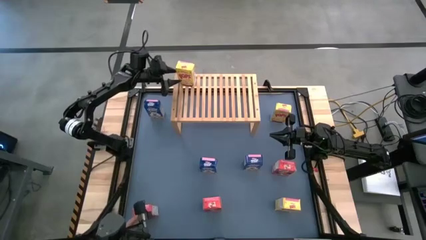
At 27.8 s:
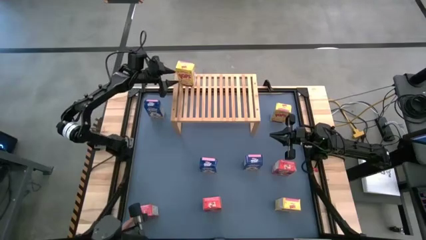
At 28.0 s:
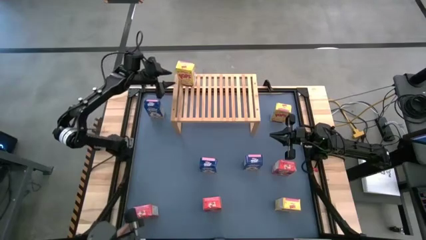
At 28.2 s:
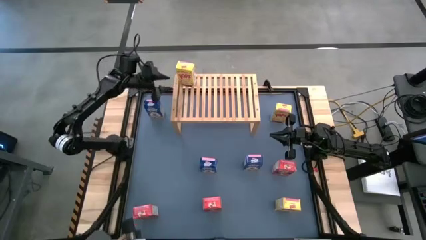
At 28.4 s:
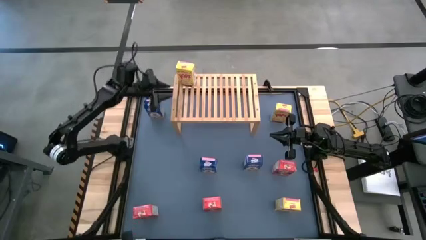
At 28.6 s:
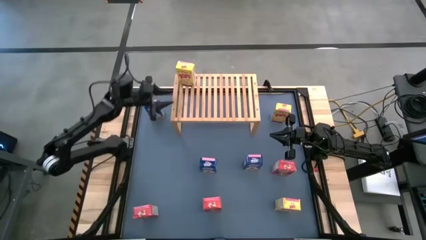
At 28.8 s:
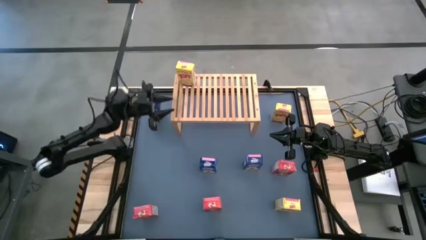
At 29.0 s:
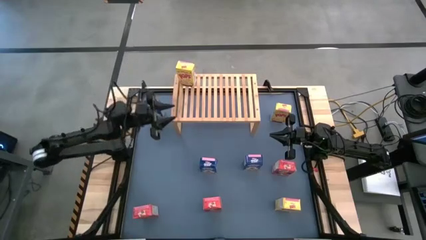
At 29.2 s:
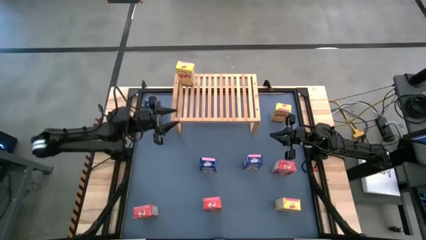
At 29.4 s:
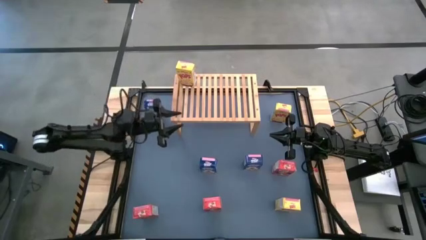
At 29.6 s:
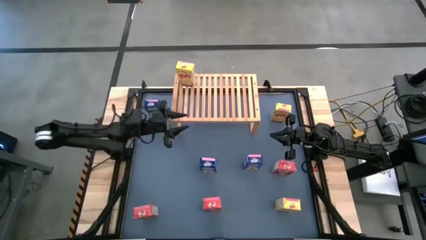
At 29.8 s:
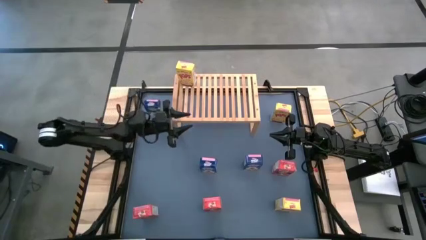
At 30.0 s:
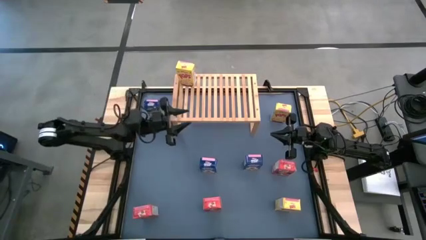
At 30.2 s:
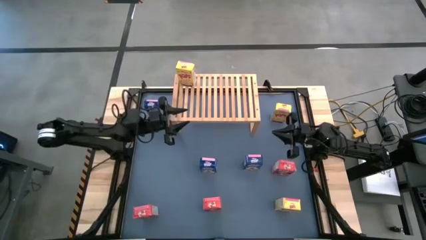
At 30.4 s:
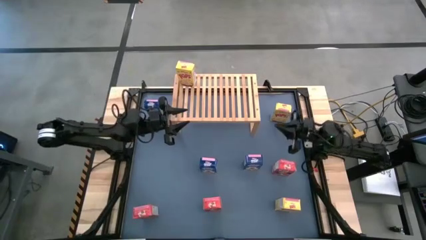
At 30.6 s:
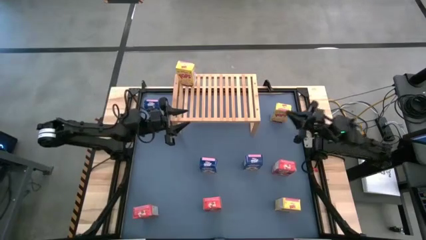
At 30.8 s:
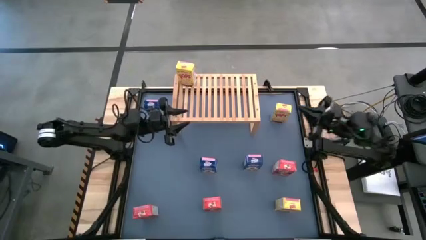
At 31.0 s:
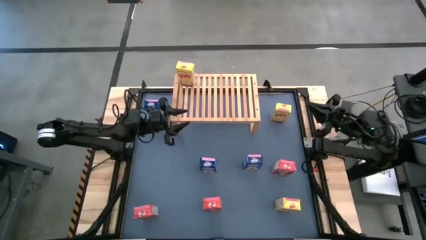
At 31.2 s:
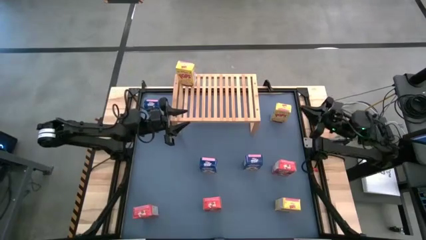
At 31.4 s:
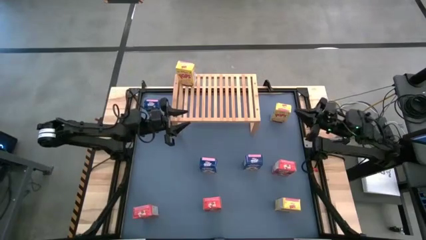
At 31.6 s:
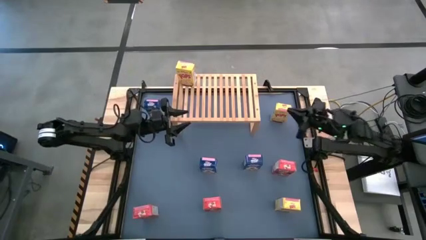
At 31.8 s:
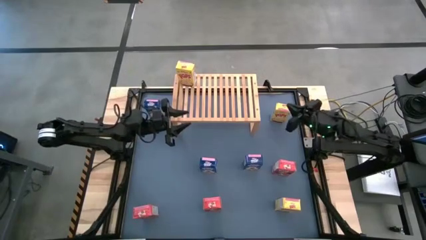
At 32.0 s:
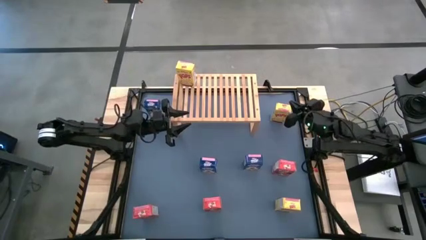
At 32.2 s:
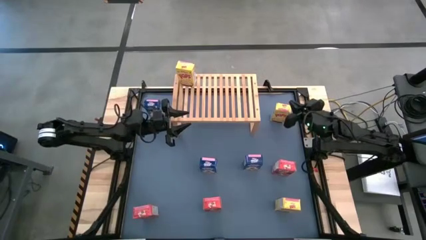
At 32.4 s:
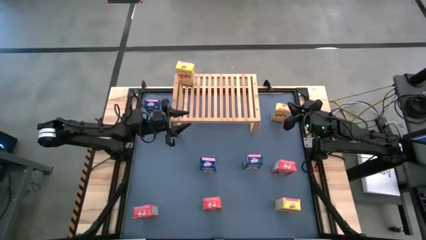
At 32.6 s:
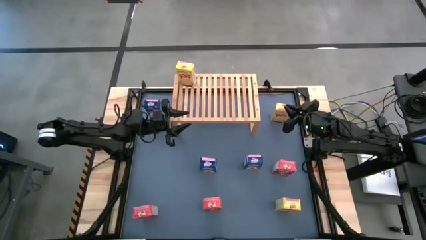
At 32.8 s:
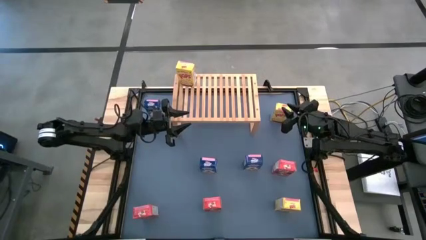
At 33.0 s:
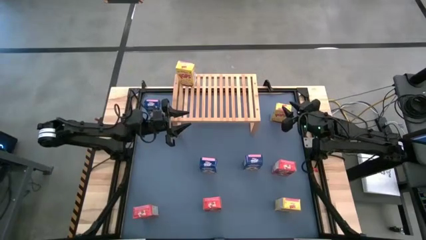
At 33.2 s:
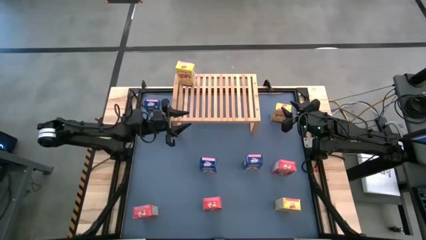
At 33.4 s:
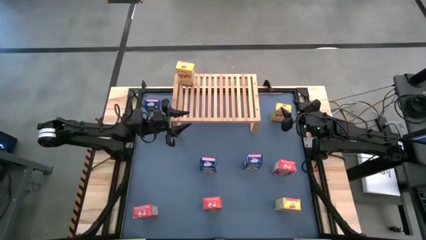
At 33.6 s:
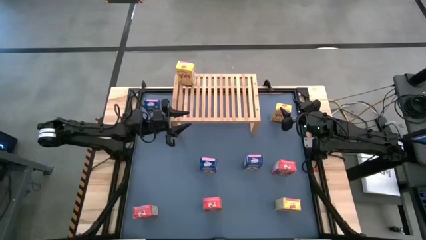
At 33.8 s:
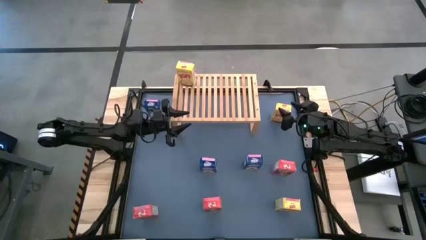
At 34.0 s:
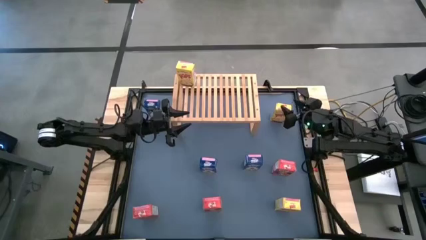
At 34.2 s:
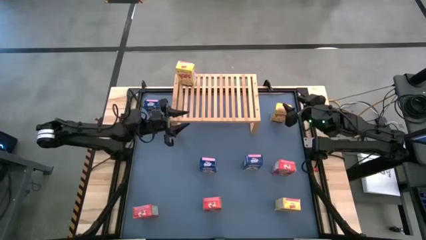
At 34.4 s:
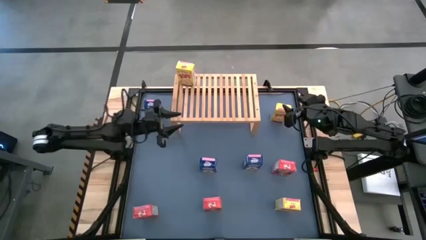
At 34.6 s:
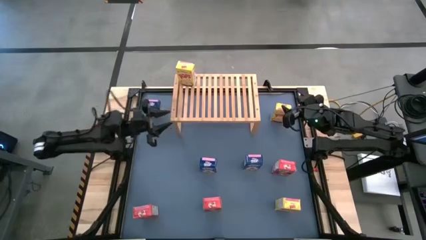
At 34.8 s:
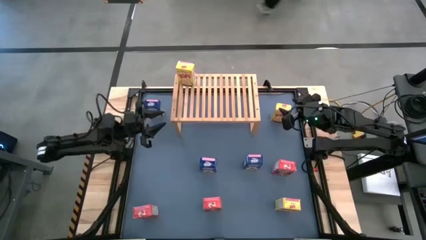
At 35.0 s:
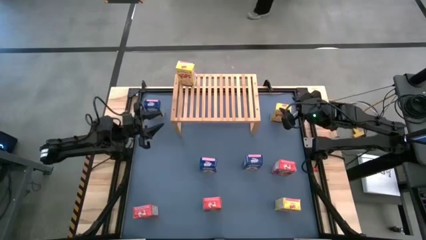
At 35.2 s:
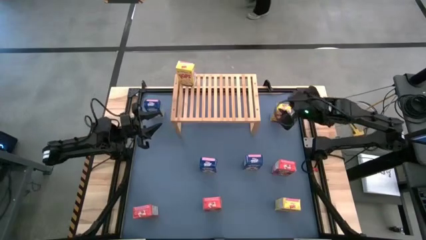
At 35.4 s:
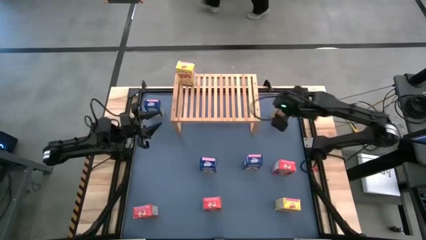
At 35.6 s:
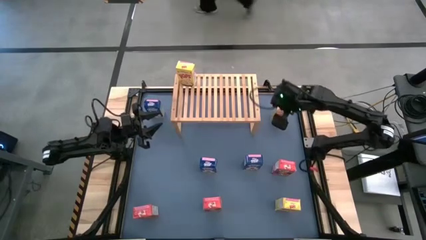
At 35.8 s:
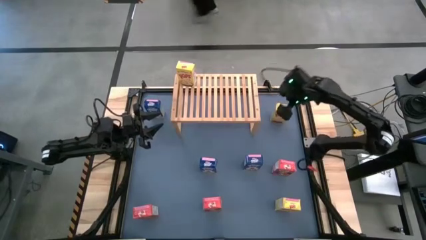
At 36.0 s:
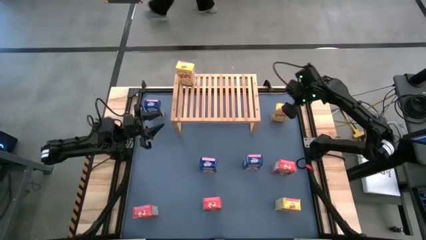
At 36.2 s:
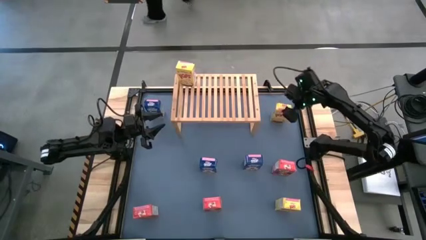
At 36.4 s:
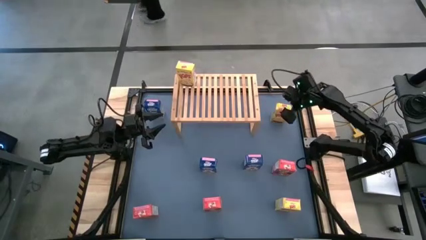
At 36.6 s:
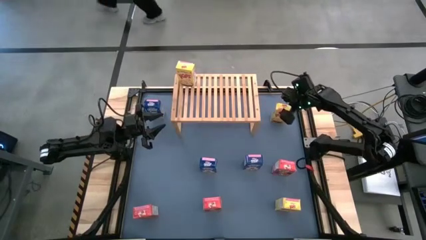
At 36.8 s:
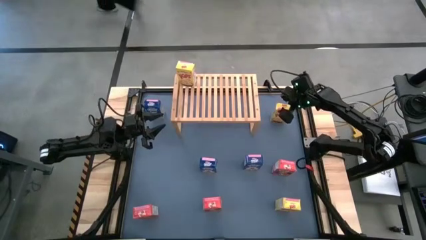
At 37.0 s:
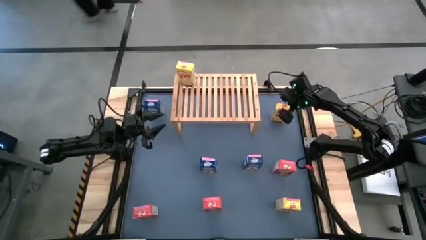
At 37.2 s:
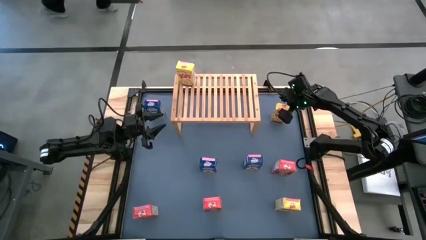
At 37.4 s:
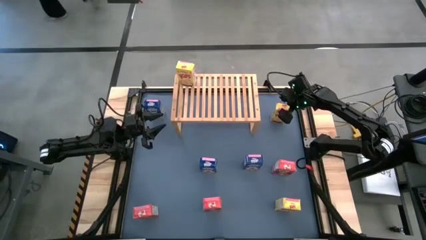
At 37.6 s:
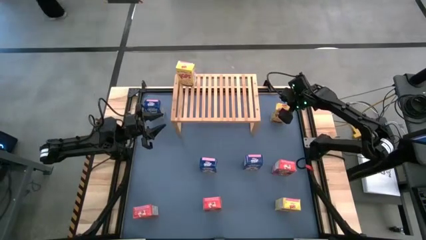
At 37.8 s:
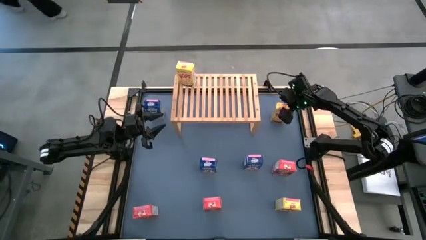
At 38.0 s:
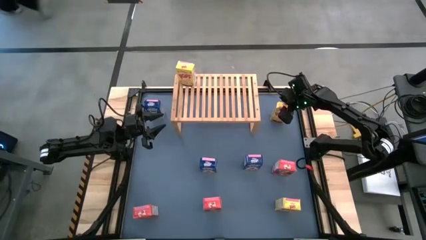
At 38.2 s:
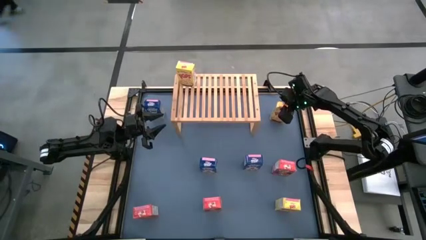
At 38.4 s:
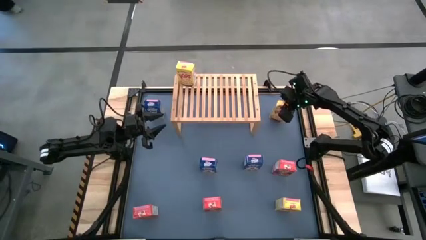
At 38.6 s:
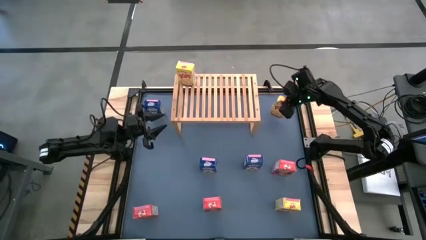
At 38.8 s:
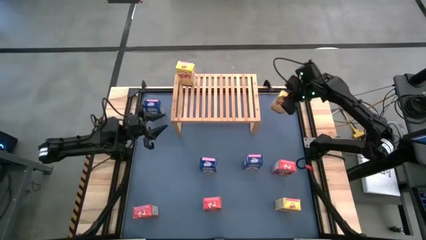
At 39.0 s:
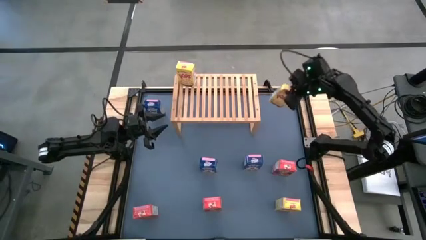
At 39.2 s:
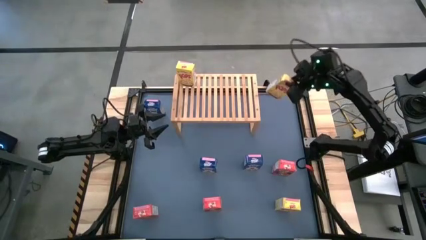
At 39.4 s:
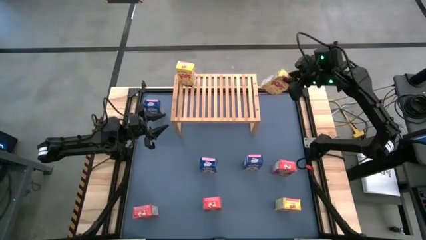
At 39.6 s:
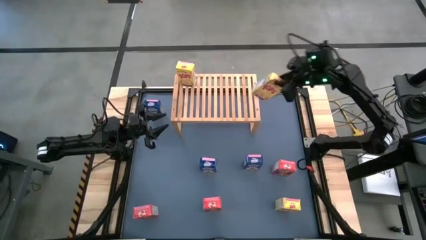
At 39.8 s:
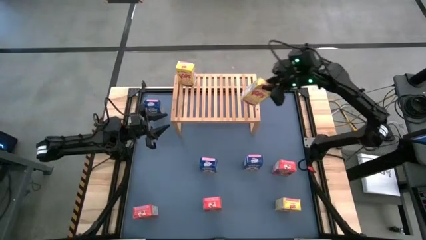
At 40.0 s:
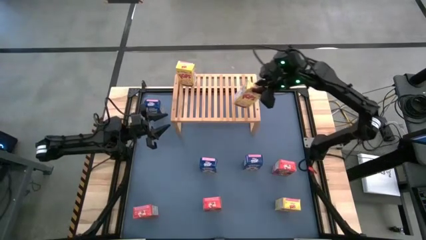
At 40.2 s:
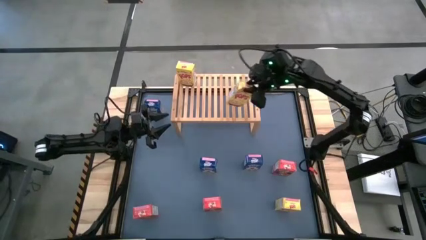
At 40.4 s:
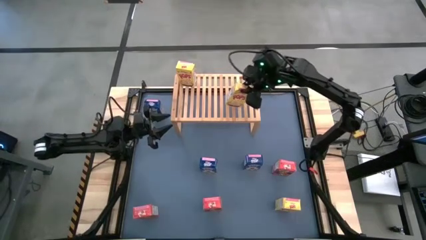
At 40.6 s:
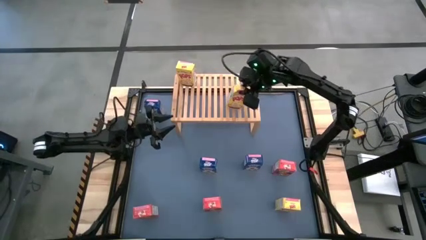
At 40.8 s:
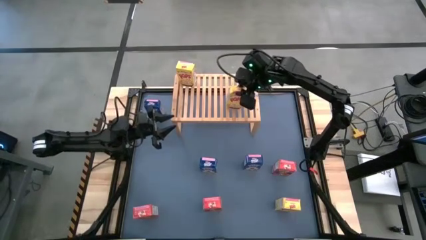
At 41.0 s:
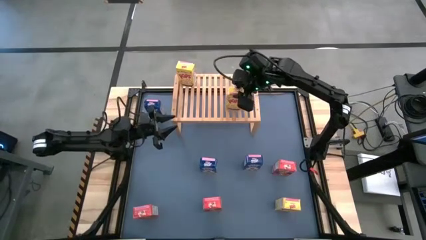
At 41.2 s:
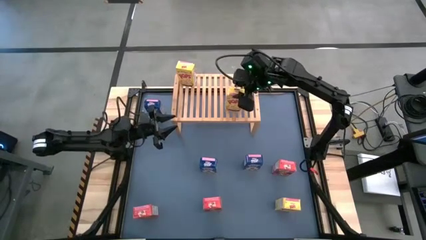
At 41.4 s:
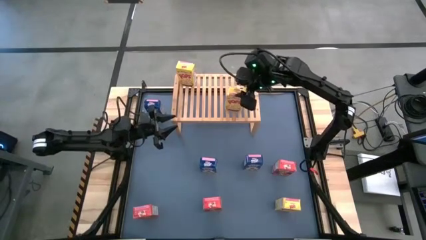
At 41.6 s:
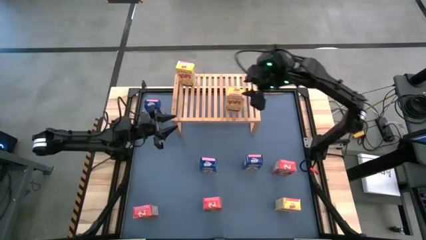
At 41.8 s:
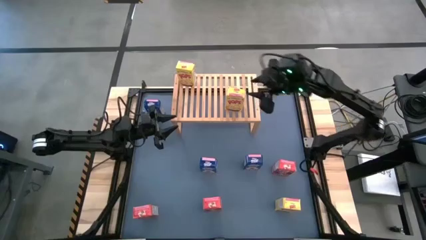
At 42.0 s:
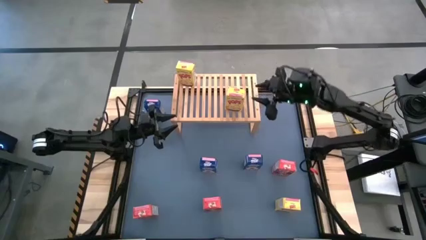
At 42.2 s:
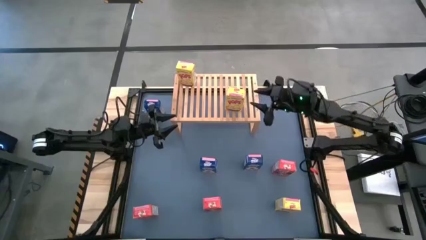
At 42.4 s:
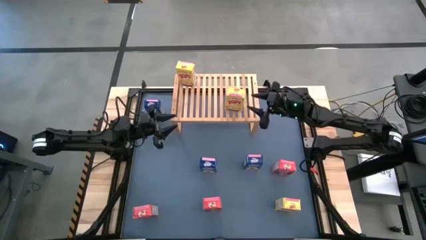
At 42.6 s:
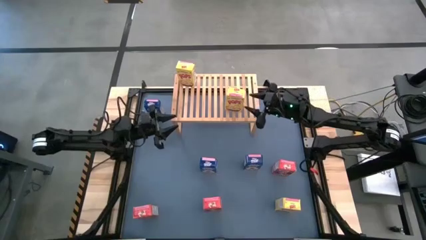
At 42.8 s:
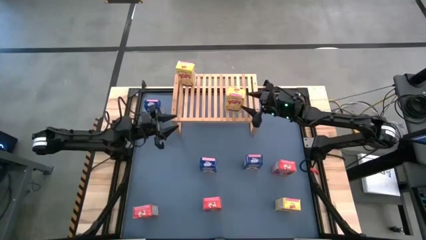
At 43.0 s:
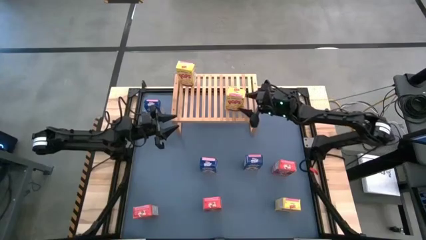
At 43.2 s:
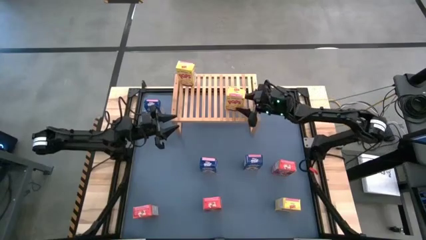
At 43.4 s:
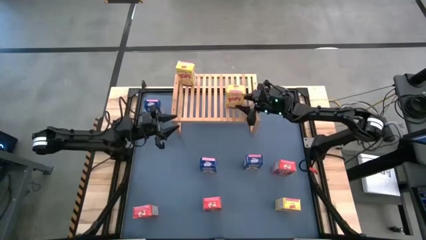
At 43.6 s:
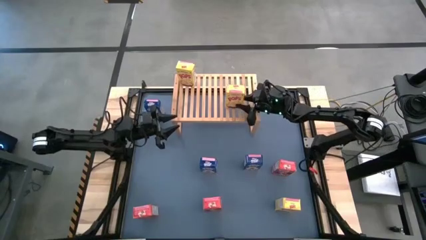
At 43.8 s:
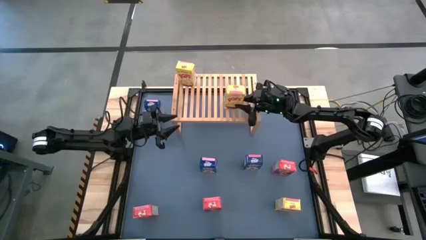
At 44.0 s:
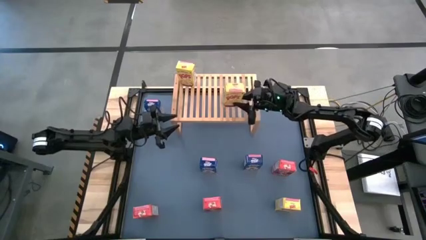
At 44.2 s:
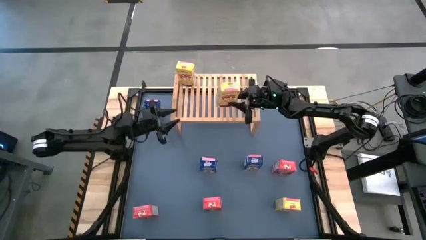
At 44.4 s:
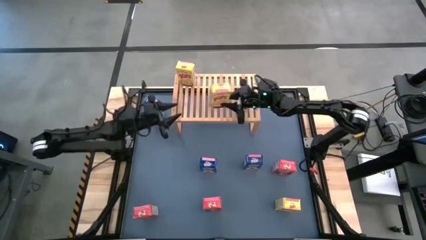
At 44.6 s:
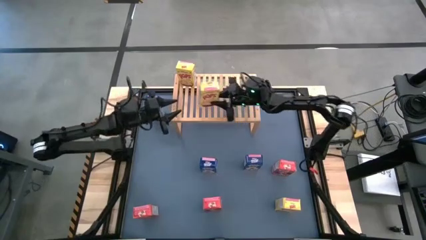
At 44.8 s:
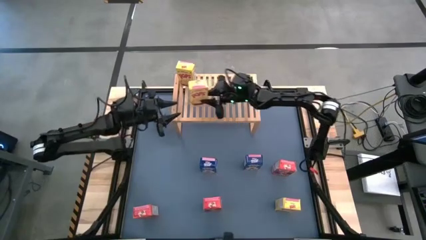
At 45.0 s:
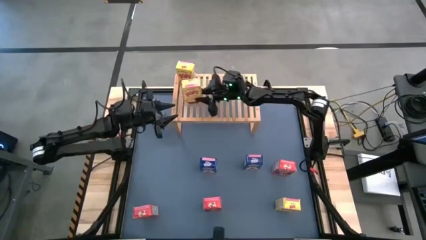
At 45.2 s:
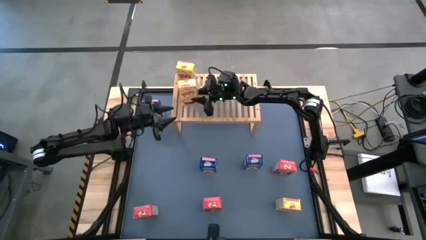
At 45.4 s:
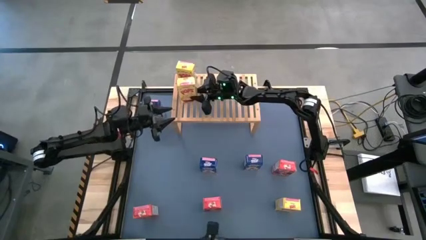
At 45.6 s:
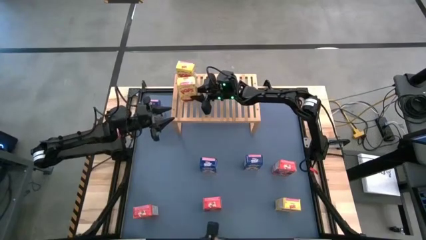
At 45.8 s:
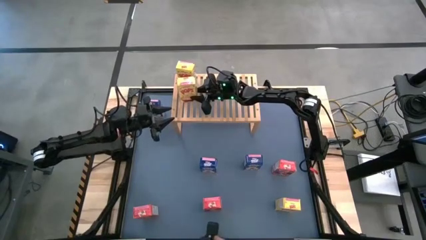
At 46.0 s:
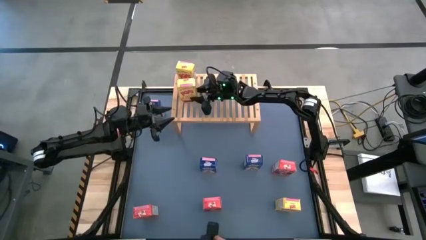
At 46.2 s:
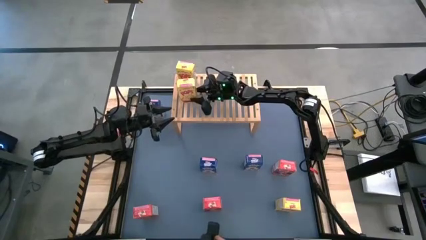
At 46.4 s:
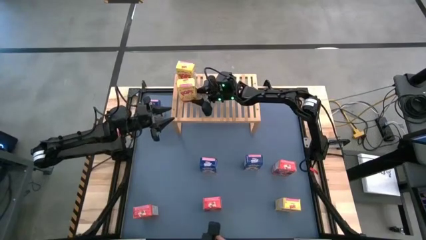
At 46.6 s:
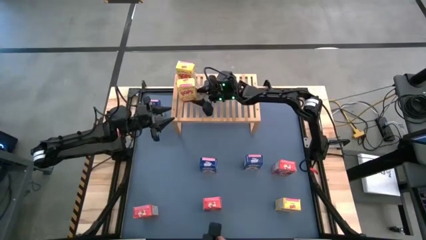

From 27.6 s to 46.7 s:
Task: Stack cereal on shelf
Put the top yellow cereal box on the shelf aligned with the other yellow cereal box
